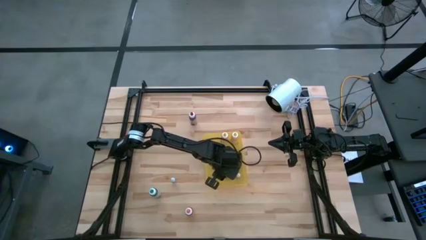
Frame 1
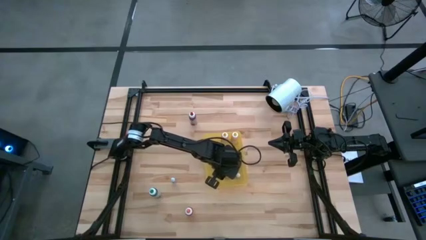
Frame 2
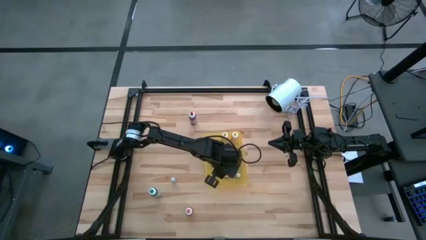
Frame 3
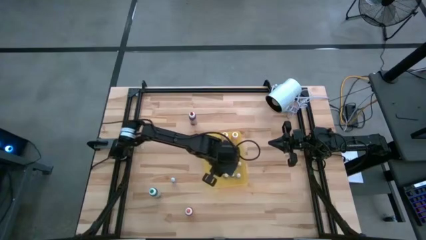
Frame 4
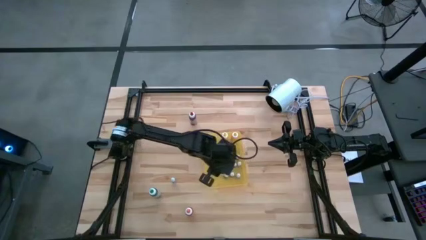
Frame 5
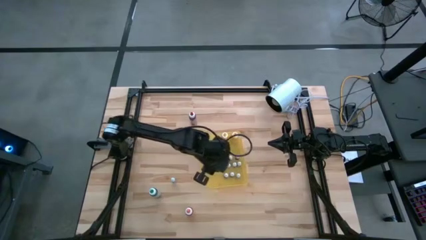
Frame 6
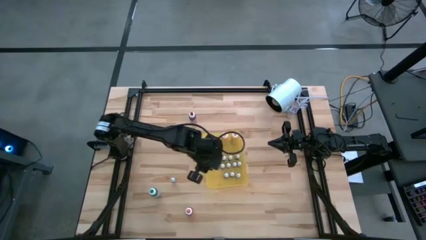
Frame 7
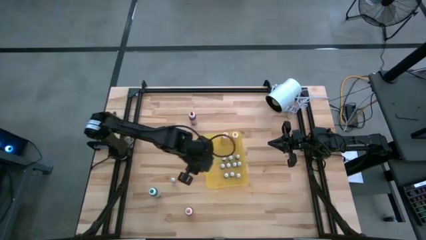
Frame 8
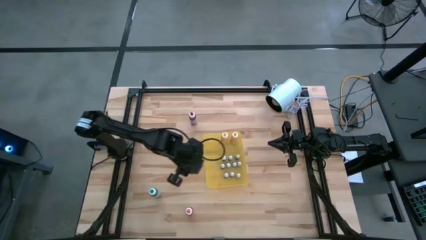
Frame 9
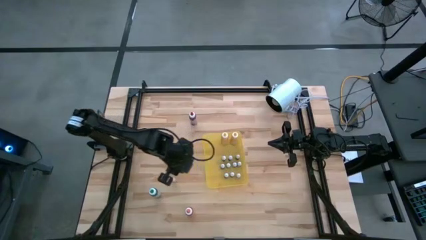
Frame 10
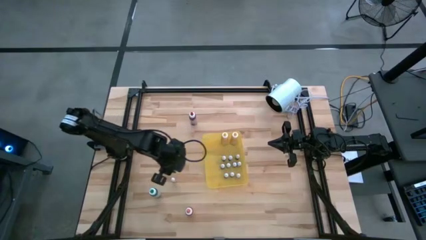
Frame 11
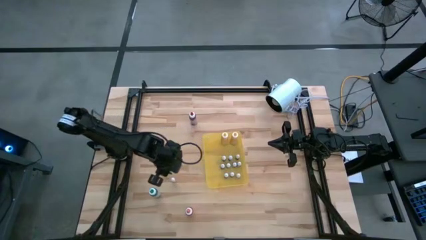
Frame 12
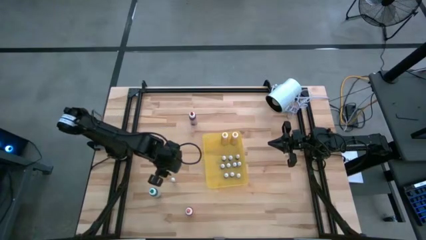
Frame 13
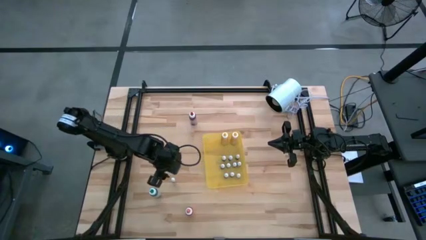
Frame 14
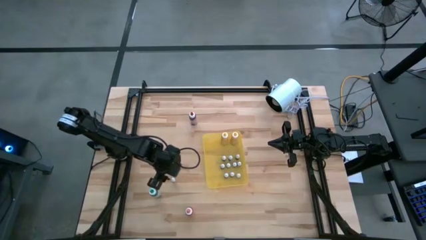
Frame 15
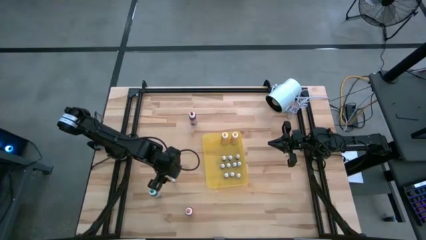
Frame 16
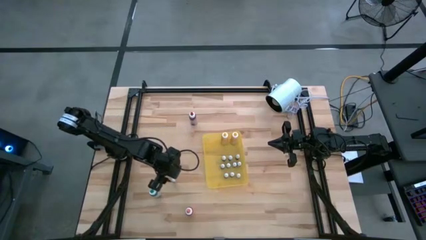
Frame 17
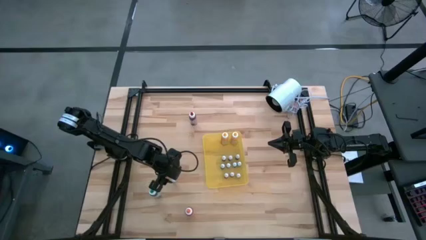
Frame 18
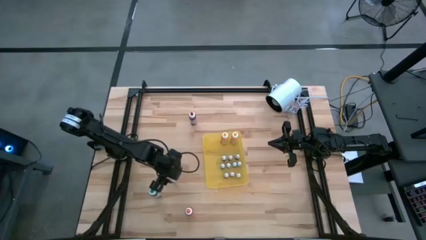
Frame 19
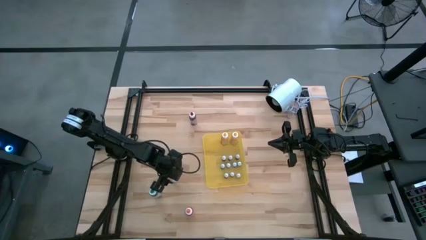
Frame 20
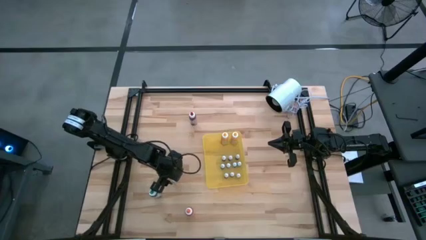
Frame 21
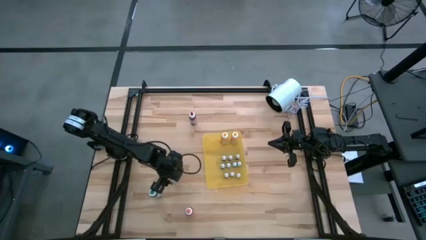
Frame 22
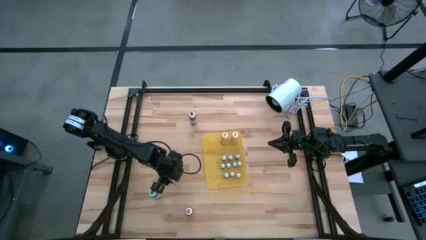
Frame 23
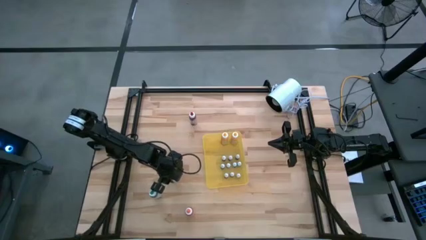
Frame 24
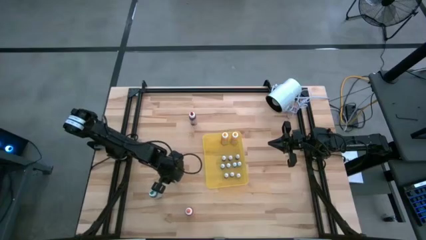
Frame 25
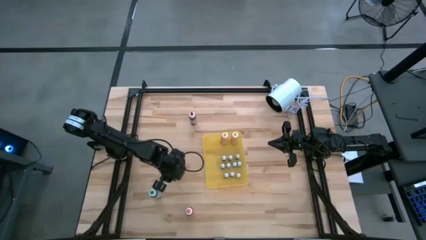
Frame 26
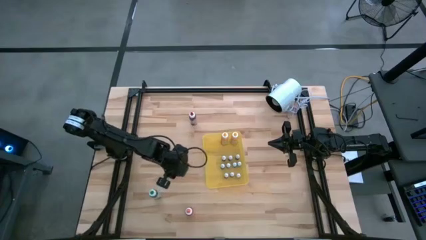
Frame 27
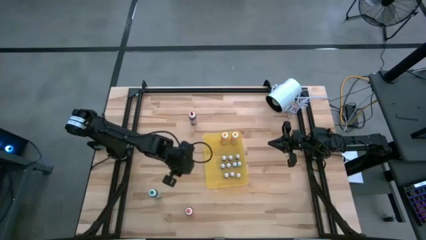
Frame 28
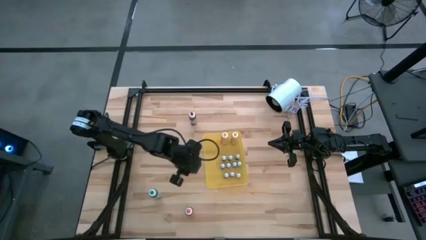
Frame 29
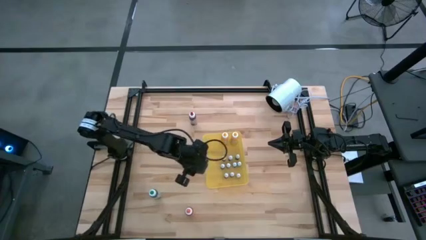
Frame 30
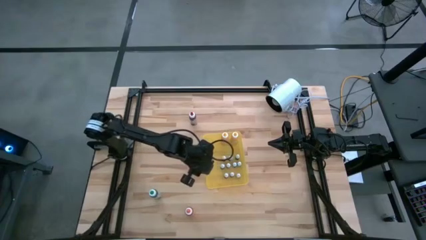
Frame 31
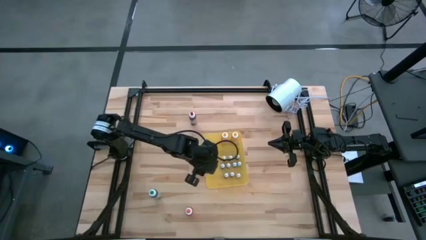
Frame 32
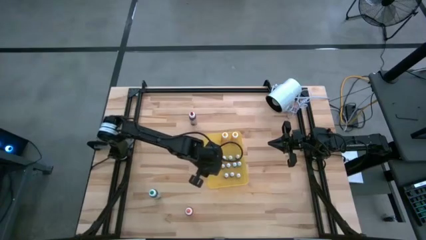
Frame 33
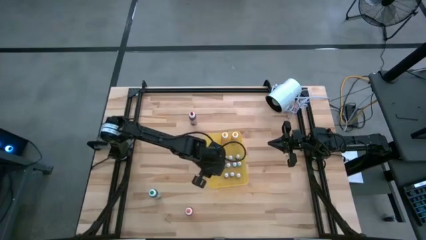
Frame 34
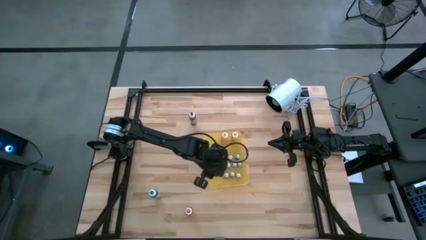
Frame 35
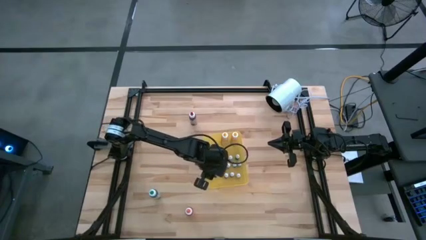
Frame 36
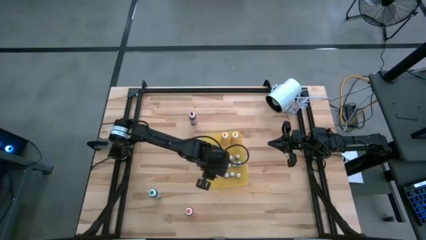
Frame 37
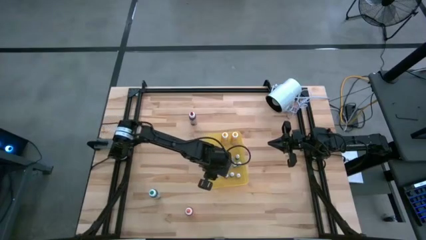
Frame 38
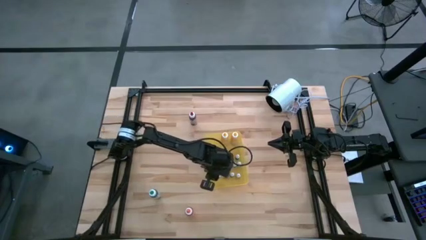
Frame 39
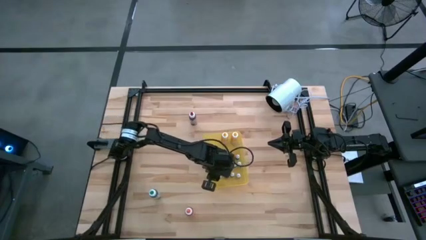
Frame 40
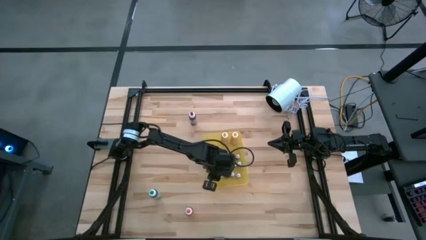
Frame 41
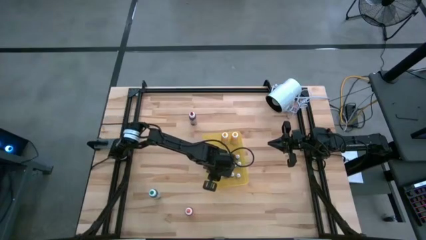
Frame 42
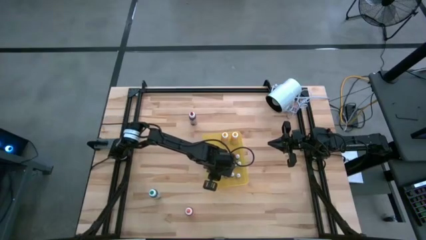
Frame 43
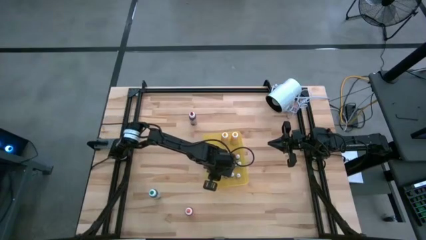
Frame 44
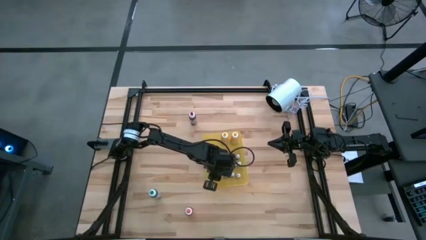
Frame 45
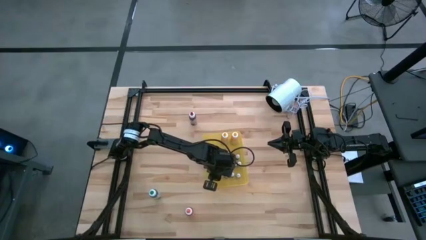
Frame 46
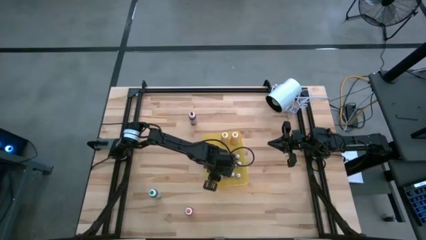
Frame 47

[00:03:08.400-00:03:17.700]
Task: Pick & Place food coloring
Put the small green food coloring bottle into the yellow bin

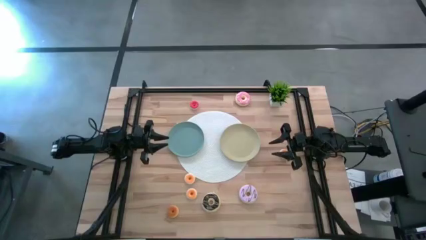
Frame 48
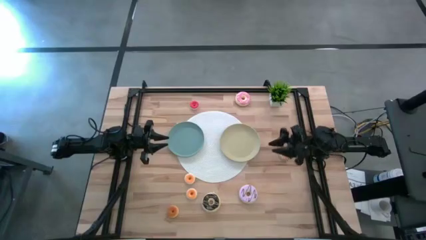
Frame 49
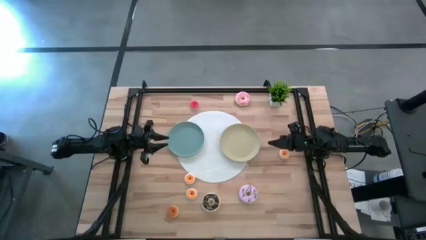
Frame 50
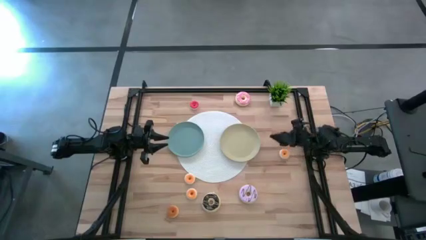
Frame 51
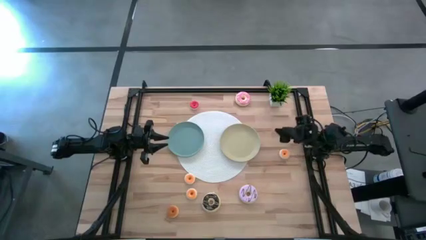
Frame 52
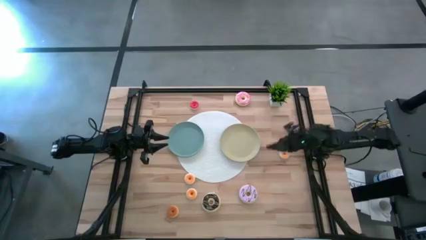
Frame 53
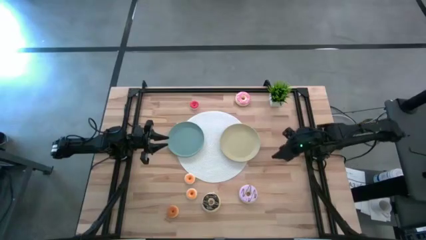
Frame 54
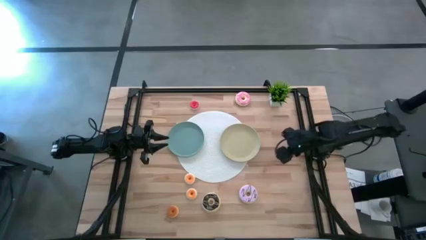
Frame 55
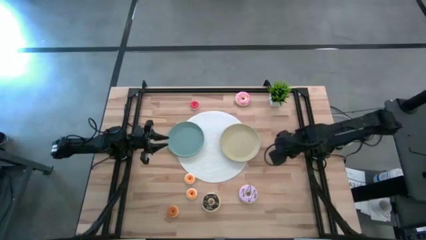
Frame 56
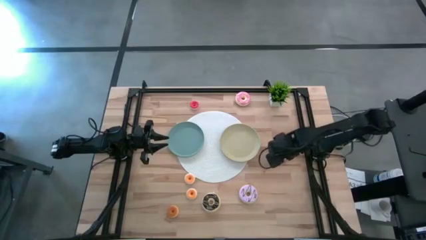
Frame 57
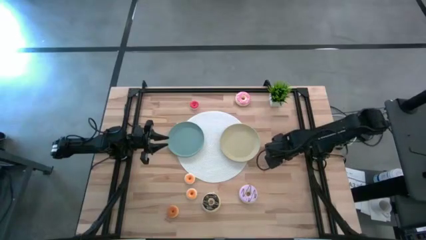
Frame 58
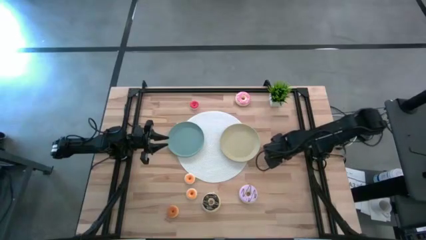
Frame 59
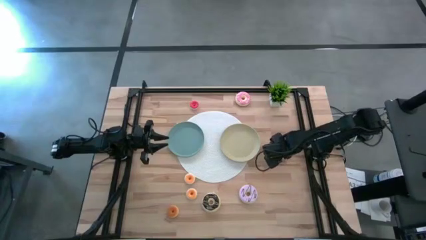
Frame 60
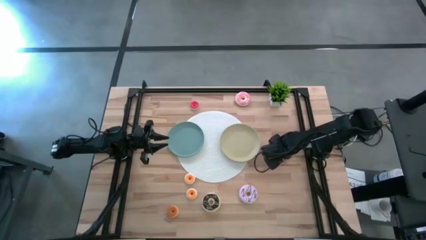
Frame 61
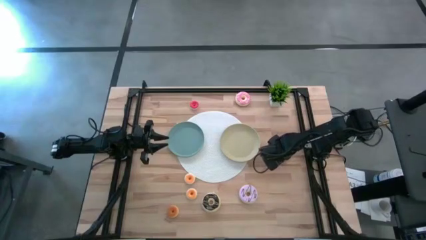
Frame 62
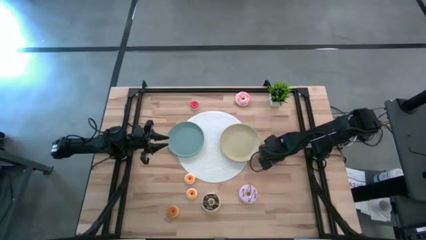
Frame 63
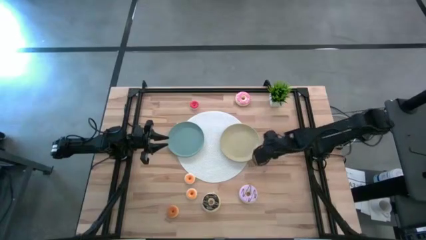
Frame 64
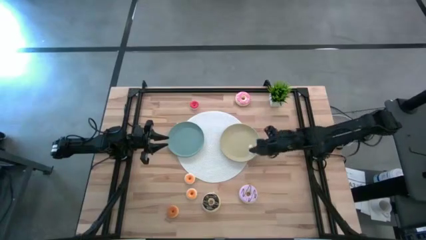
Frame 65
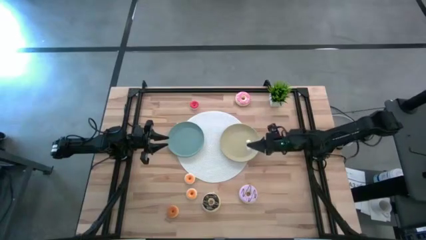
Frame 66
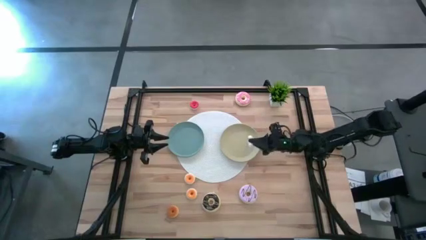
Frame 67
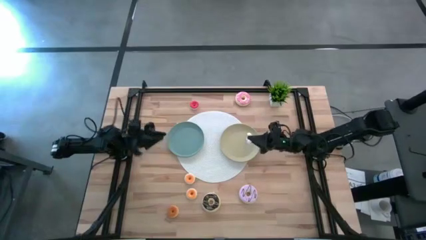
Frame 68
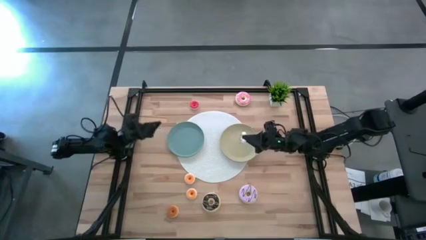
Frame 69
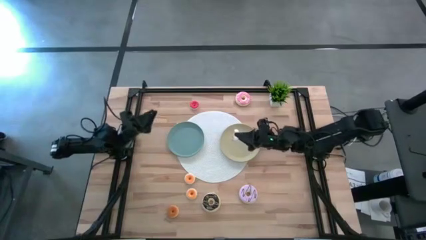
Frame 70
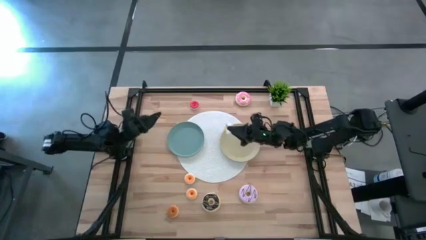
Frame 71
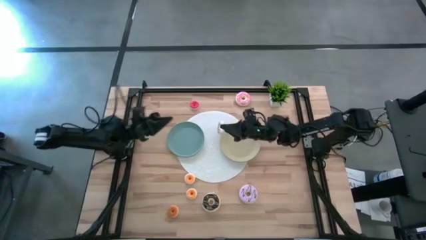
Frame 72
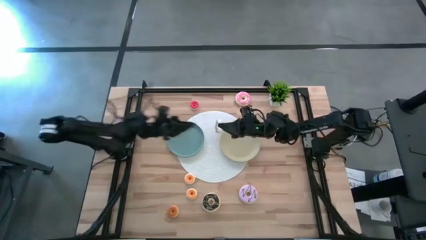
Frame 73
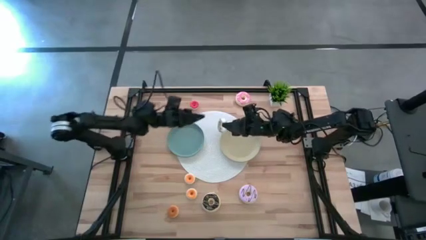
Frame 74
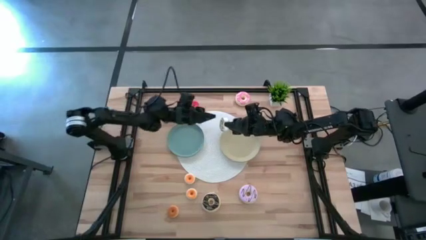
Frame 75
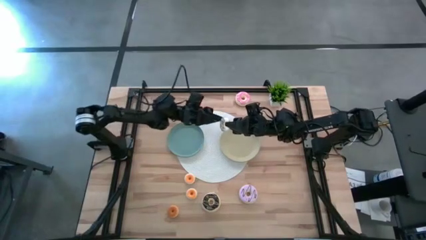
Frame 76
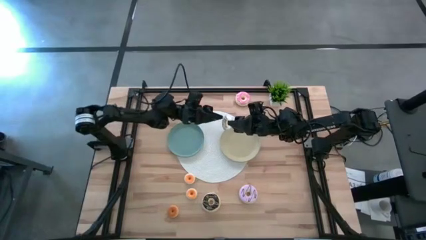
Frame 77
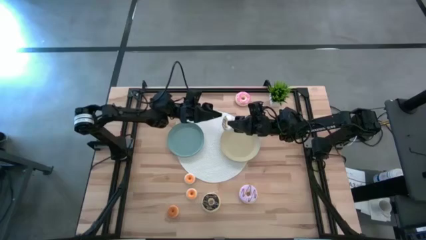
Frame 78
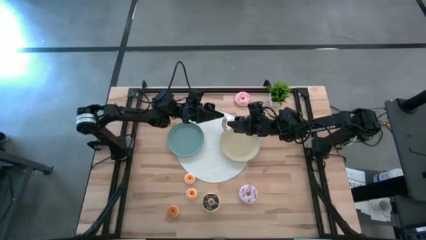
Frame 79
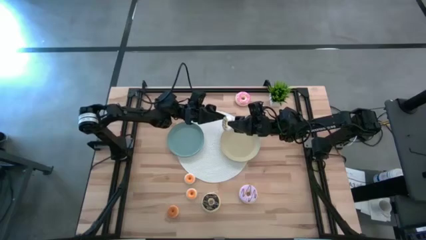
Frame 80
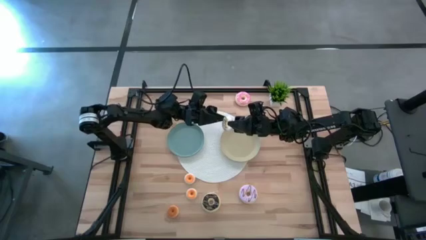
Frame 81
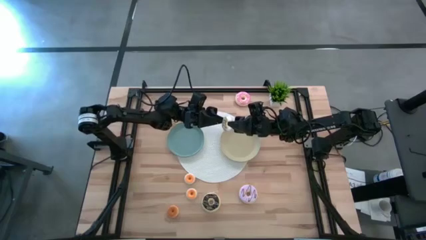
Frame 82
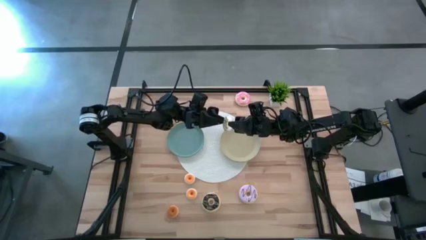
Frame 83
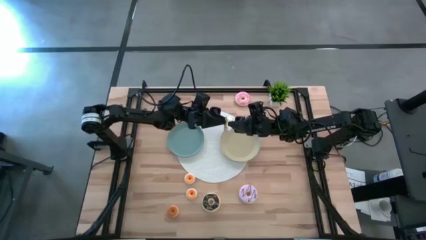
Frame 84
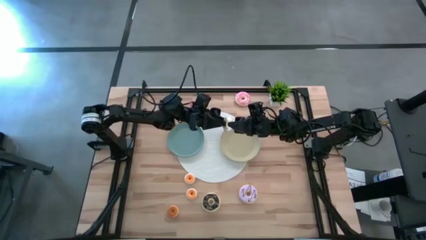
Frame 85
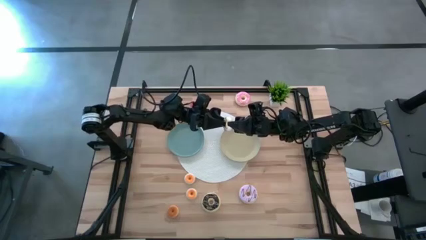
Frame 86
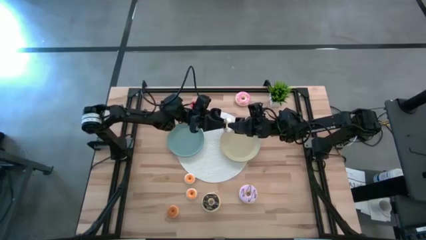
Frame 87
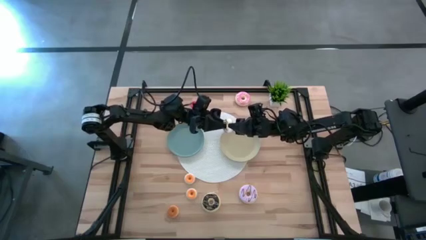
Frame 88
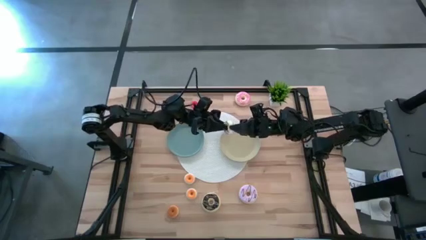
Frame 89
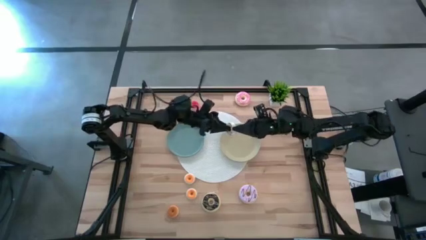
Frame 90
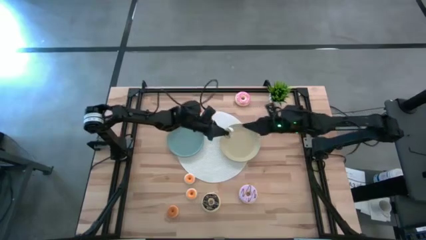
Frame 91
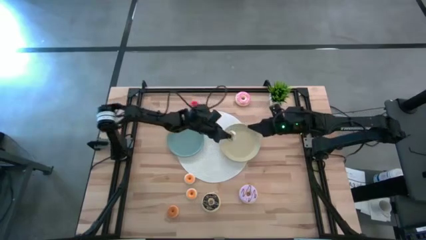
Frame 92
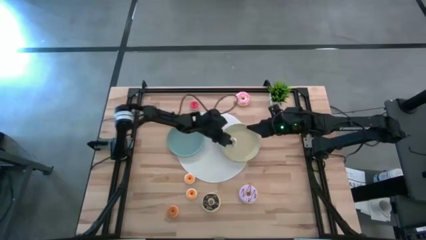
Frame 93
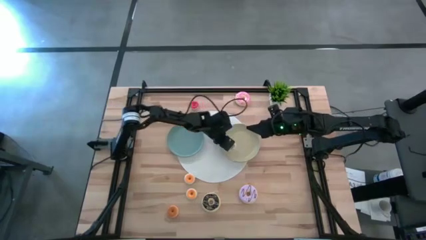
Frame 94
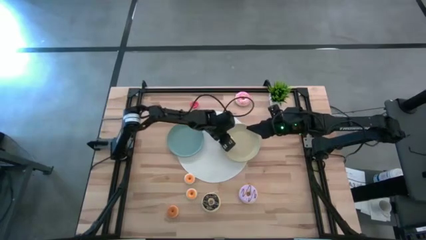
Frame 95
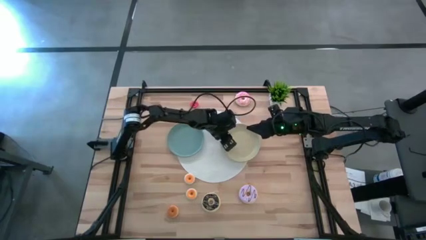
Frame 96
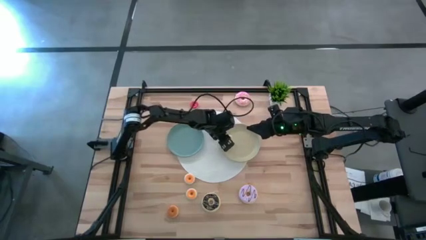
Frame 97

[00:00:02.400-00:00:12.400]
Task: Pick & Place donuts
Put the right small yellow donut on the brown plate
